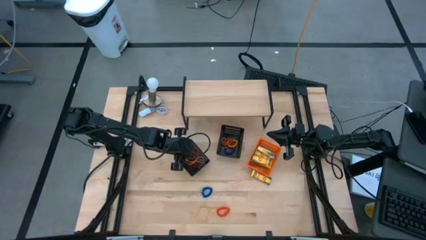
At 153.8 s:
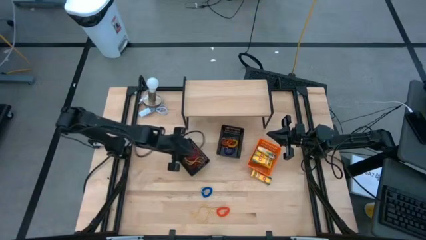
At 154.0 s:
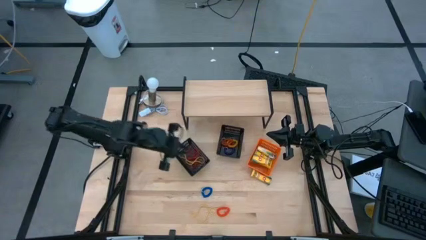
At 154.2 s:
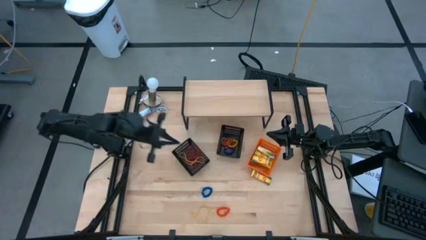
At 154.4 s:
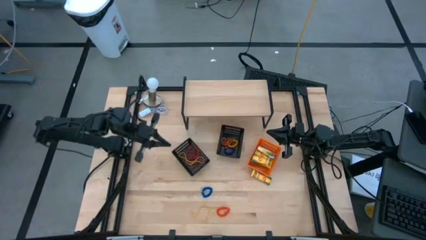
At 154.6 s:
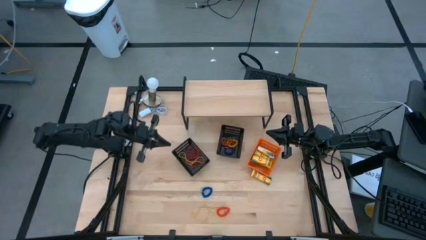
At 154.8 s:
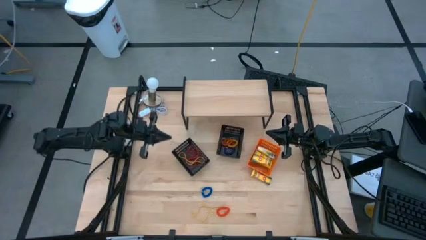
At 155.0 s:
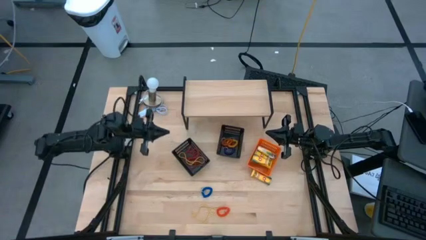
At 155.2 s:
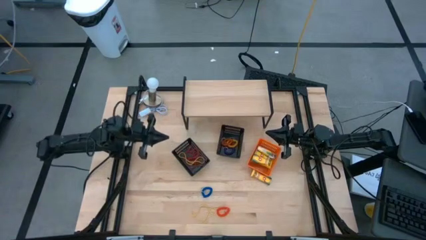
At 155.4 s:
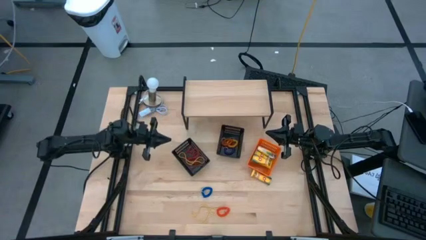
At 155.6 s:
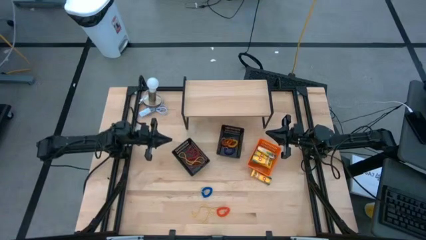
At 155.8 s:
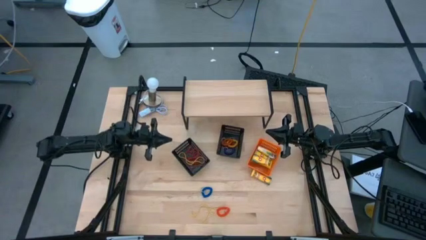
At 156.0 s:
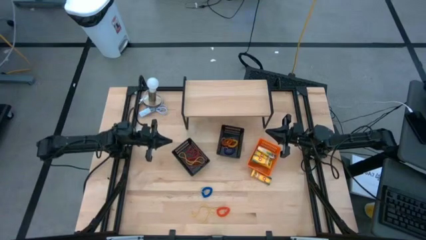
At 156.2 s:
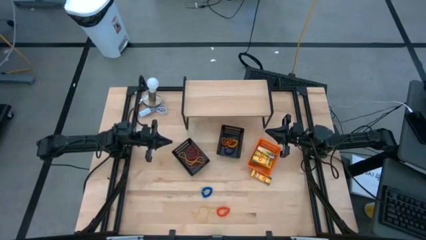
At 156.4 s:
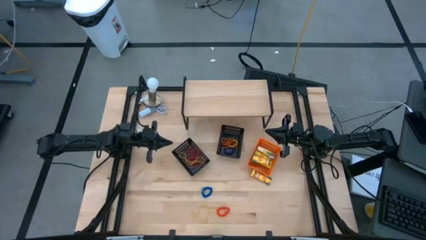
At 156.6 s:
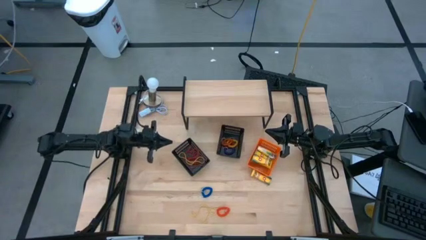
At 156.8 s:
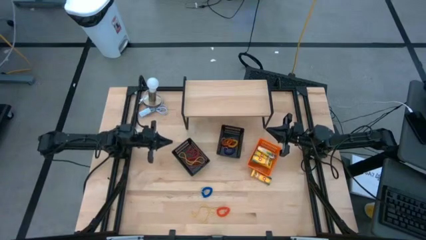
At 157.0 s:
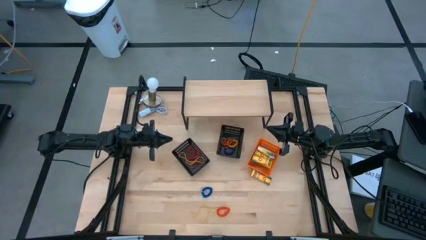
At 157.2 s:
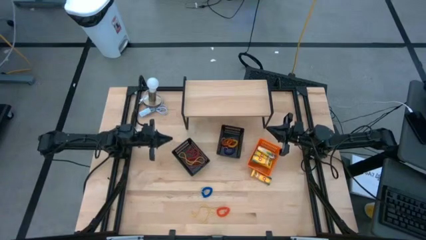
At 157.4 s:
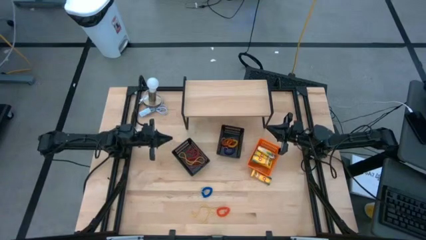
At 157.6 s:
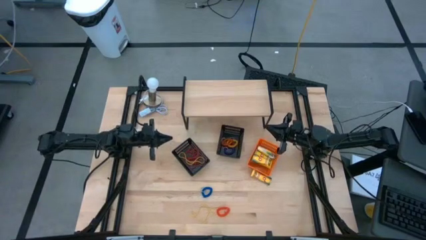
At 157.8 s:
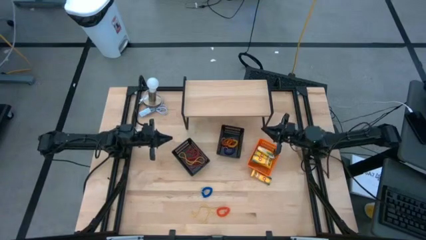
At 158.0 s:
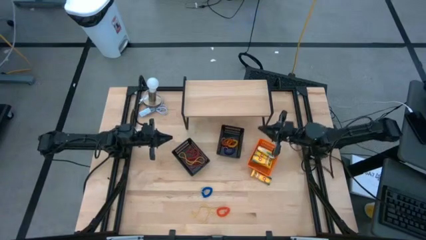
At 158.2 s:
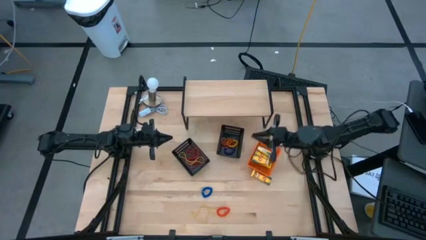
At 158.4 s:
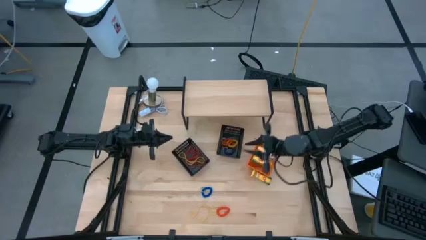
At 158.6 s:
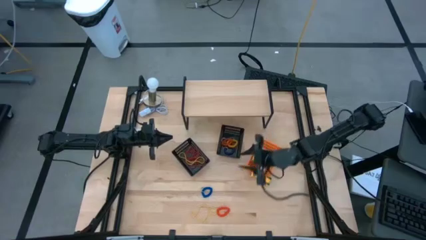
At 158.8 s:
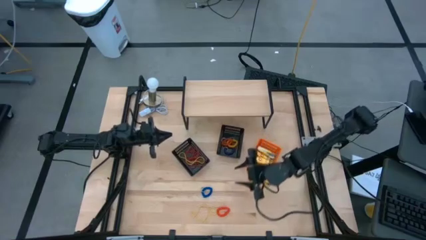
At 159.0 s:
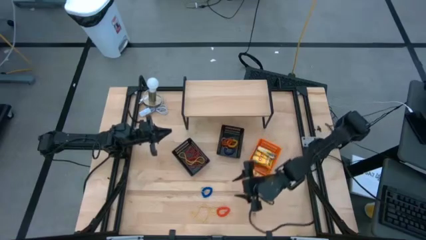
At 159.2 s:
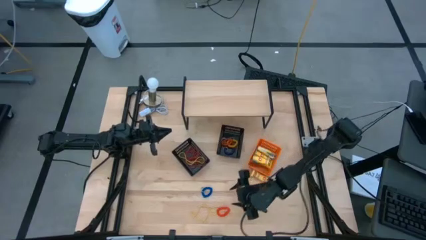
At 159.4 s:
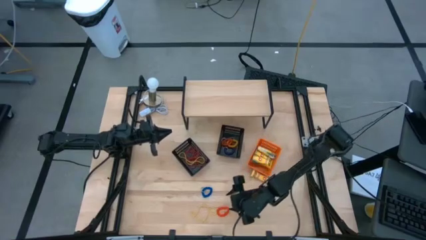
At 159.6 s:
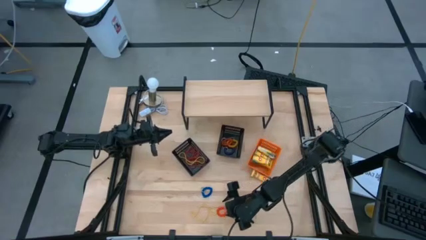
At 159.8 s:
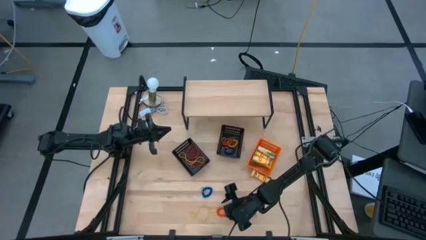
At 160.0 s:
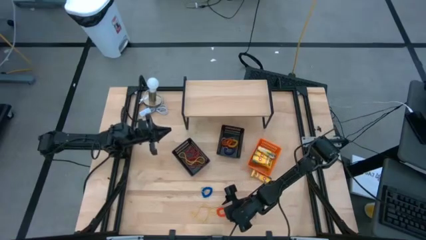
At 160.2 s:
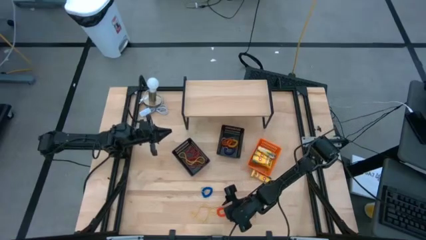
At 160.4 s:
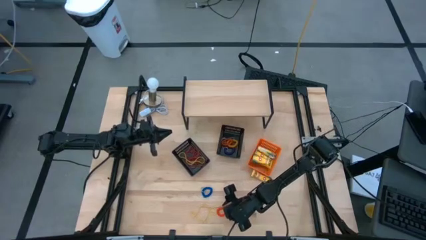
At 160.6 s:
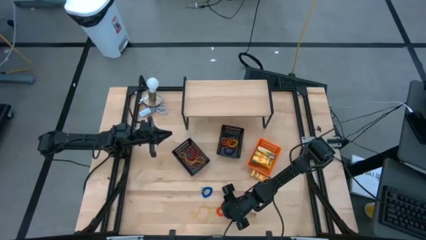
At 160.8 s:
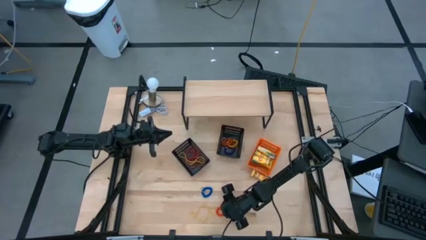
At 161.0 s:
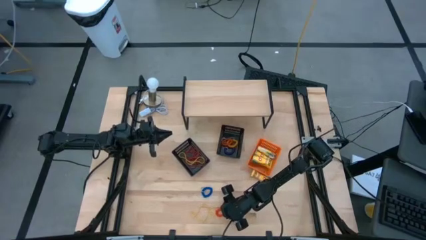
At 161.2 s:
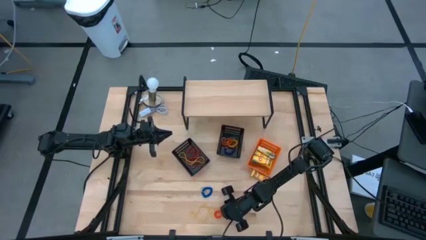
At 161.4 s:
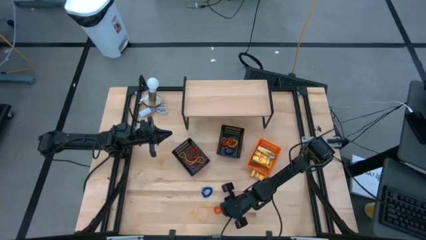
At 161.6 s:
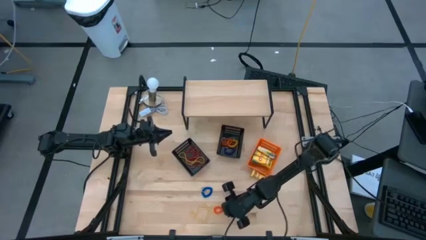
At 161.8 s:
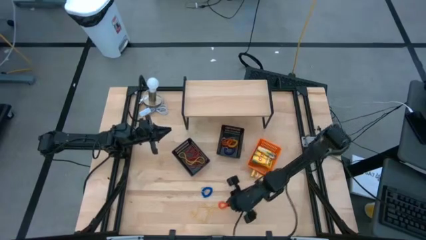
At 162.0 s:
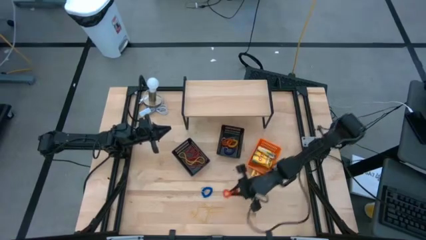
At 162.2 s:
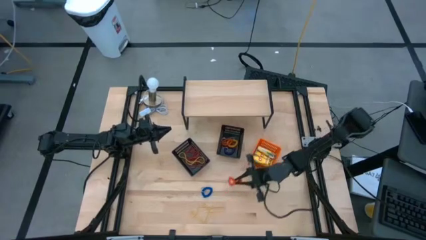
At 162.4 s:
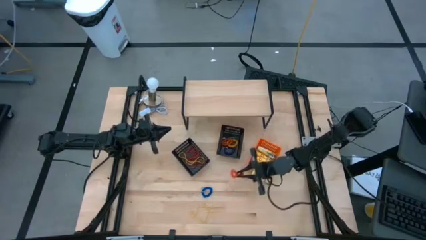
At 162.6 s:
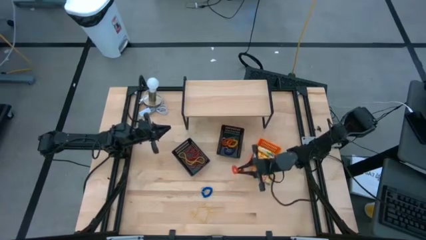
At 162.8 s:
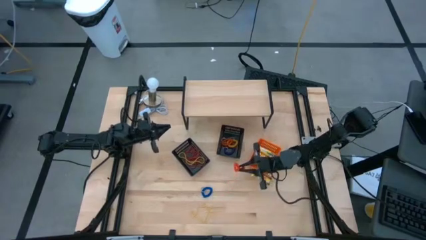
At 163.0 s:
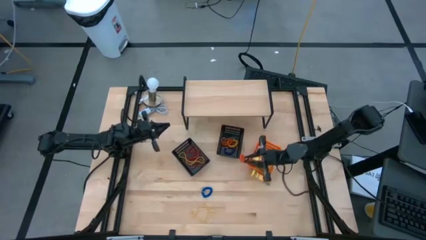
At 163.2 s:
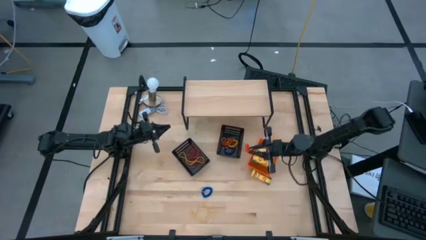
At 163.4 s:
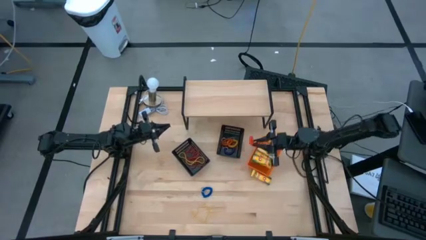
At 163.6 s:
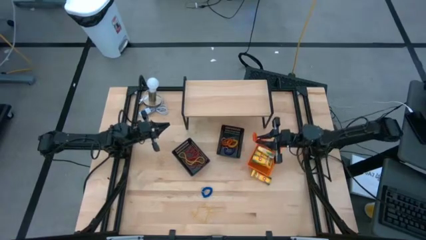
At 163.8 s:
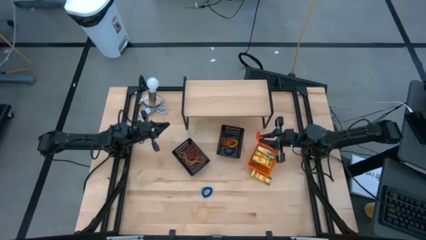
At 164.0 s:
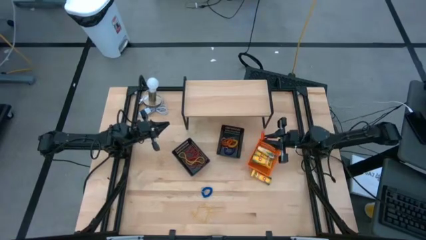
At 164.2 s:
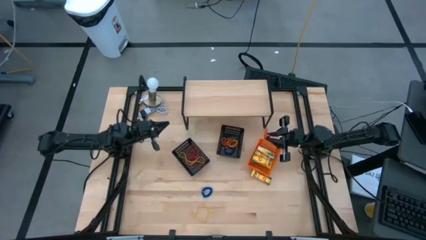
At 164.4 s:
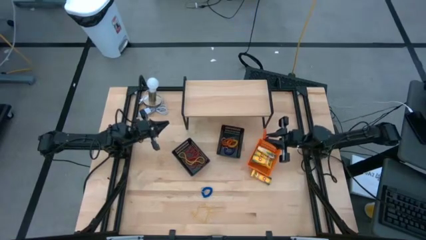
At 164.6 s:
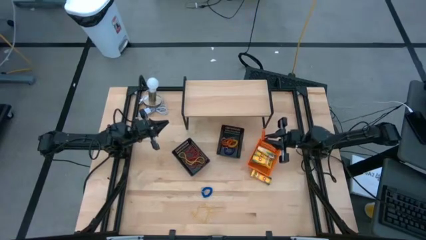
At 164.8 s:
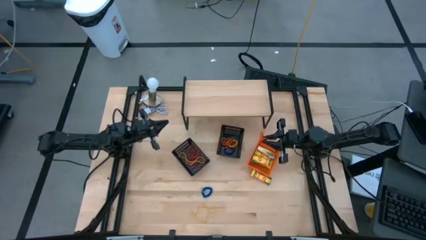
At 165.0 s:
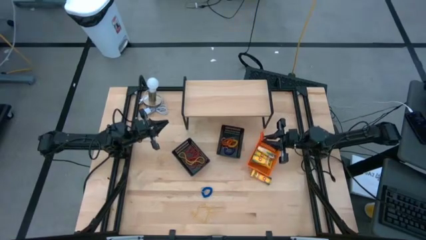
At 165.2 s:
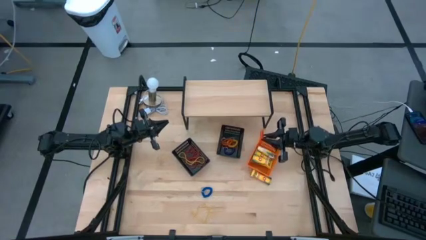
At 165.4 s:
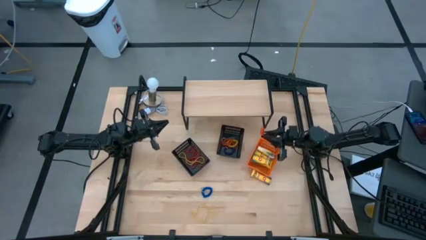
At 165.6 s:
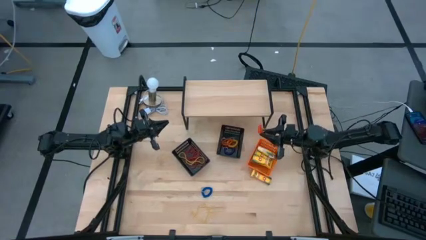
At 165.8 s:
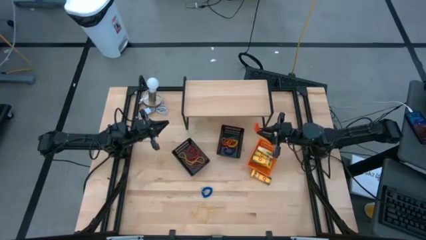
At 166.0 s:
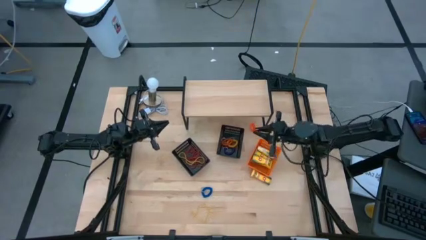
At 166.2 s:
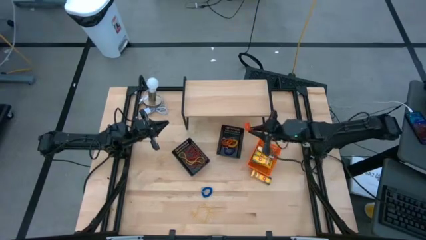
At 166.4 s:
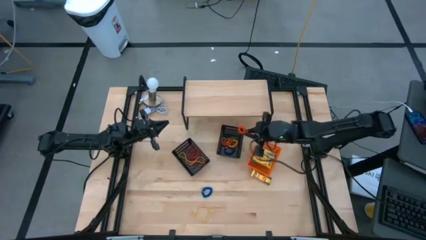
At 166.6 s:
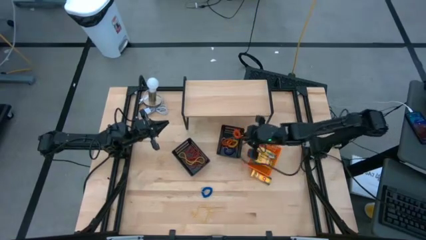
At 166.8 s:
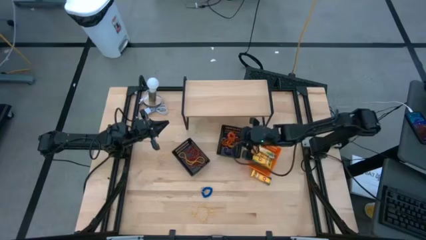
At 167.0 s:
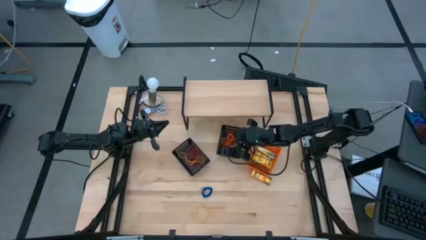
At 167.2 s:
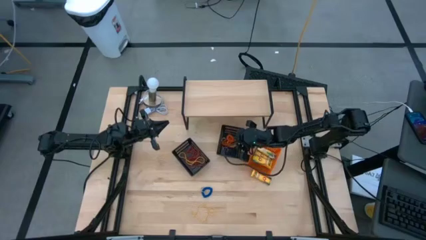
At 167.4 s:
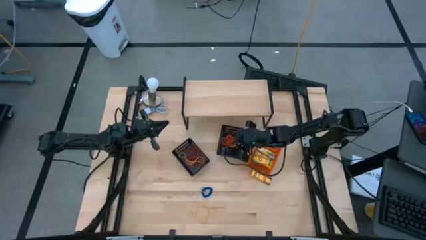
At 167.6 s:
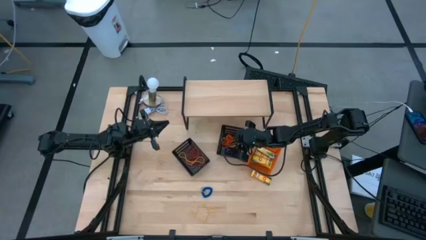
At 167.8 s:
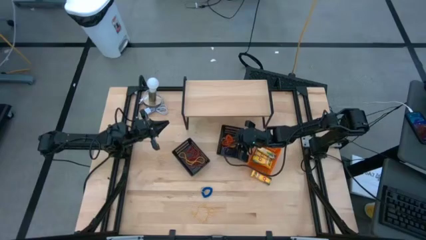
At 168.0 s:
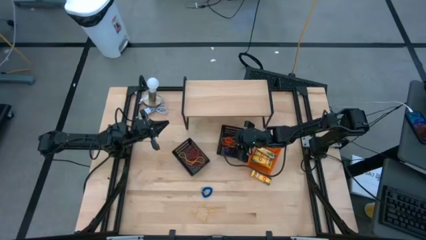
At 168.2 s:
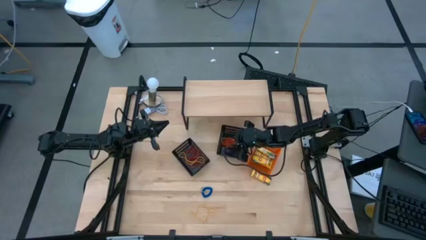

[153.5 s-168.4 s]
Task: Pick & Place Office Desk Supplies
Put the orange spring keychain into the right black bin
